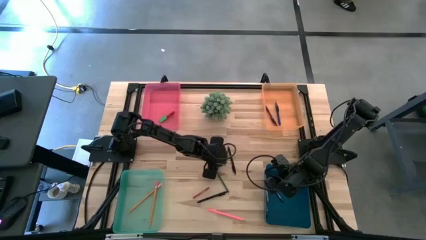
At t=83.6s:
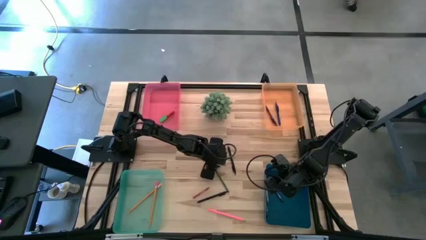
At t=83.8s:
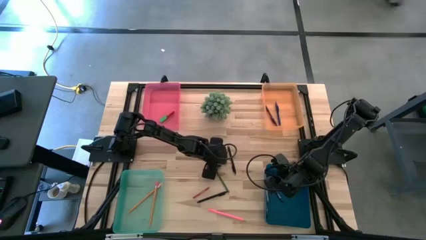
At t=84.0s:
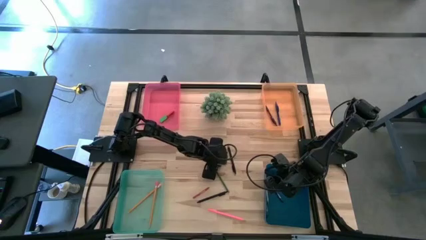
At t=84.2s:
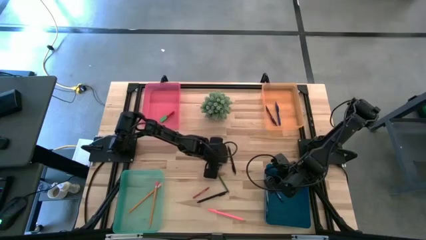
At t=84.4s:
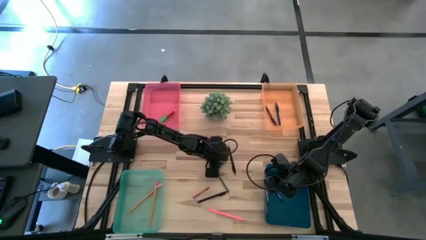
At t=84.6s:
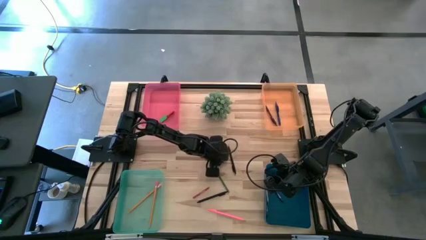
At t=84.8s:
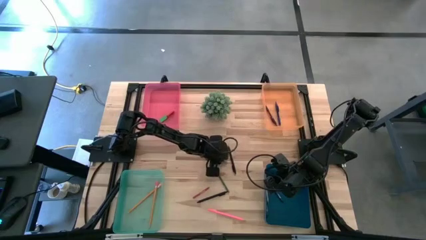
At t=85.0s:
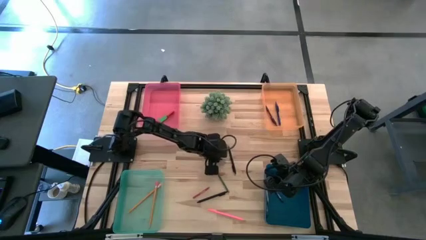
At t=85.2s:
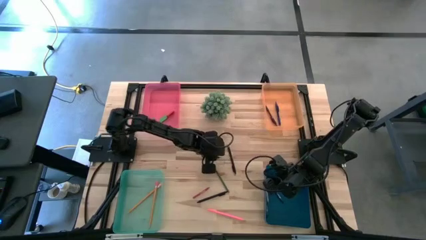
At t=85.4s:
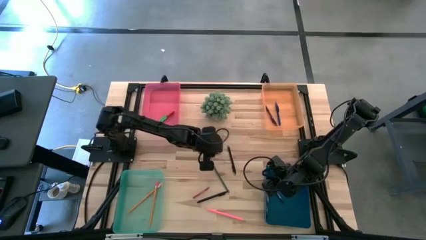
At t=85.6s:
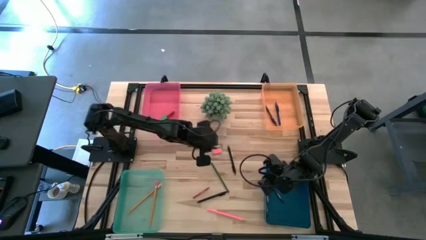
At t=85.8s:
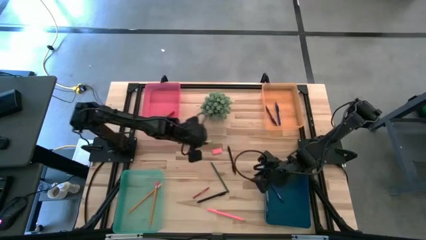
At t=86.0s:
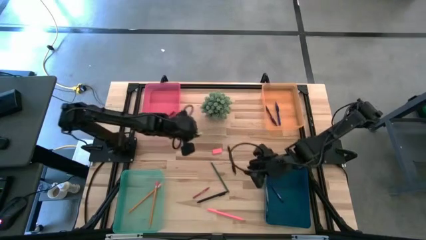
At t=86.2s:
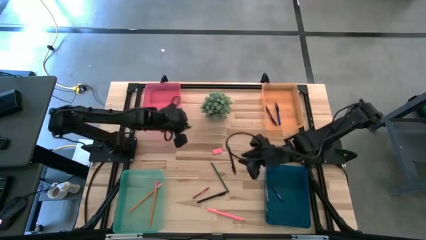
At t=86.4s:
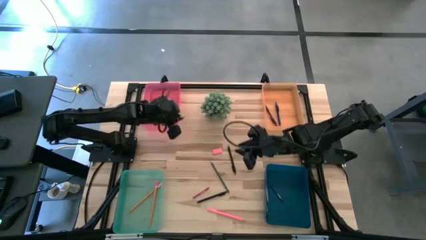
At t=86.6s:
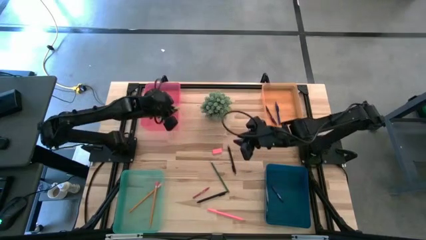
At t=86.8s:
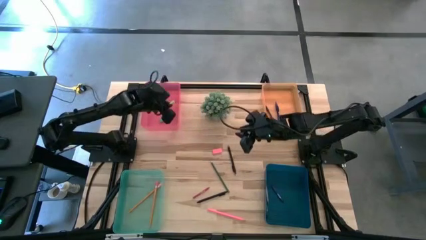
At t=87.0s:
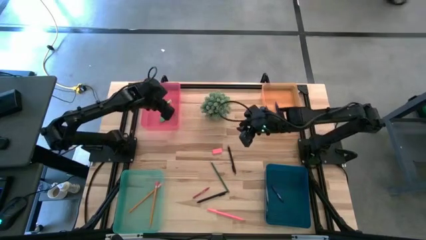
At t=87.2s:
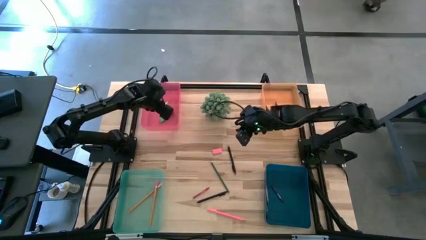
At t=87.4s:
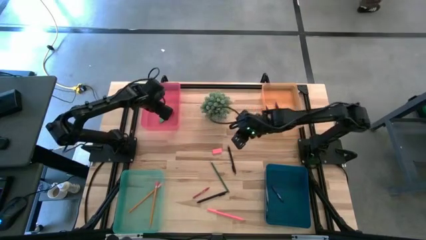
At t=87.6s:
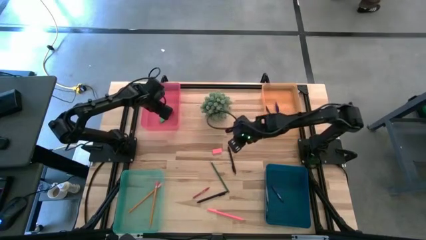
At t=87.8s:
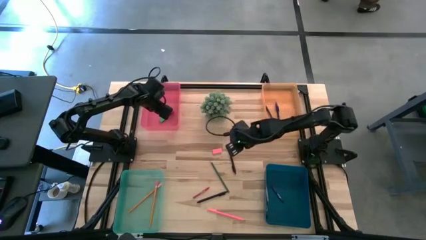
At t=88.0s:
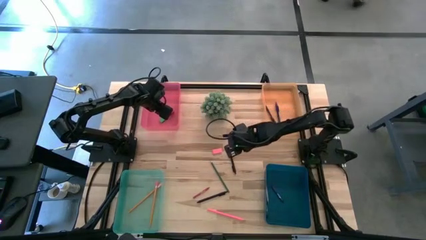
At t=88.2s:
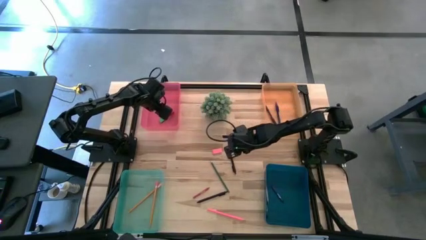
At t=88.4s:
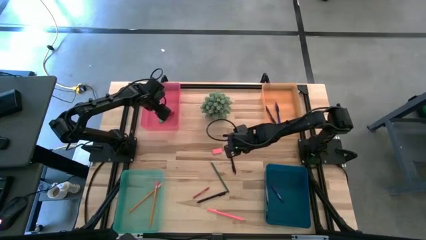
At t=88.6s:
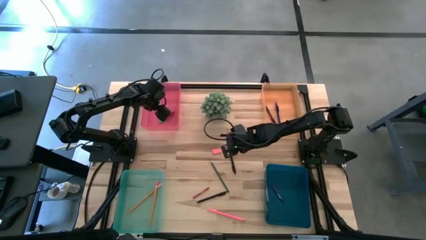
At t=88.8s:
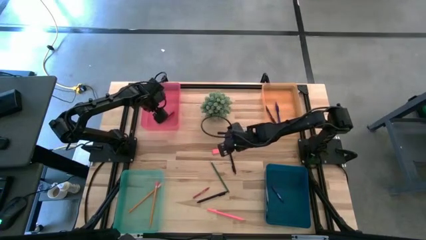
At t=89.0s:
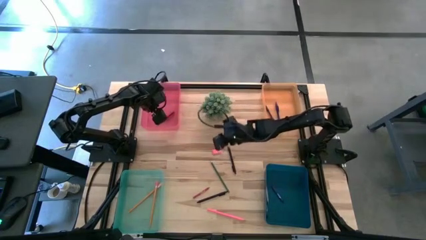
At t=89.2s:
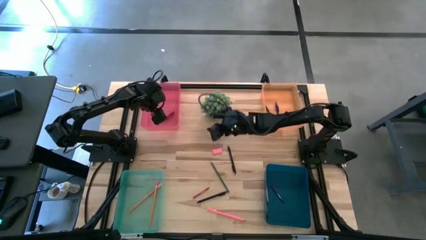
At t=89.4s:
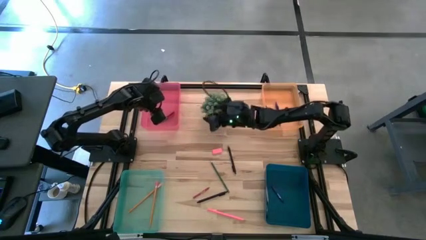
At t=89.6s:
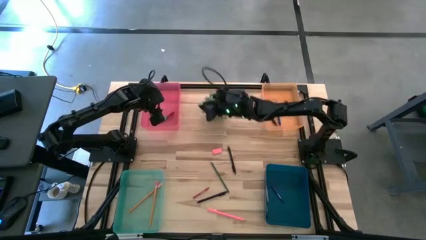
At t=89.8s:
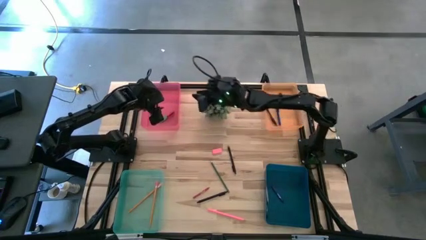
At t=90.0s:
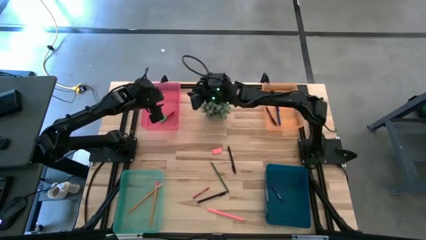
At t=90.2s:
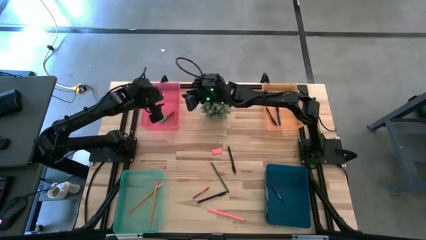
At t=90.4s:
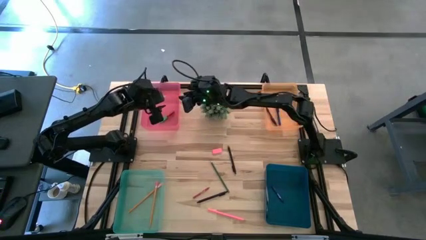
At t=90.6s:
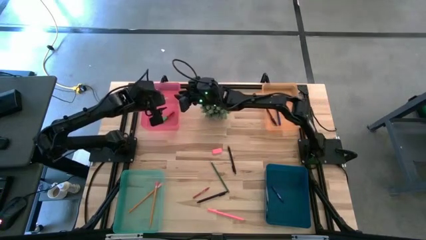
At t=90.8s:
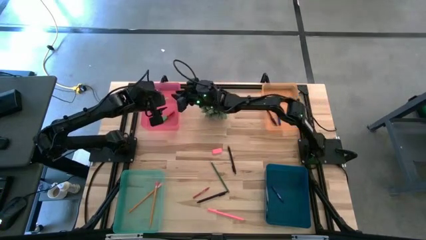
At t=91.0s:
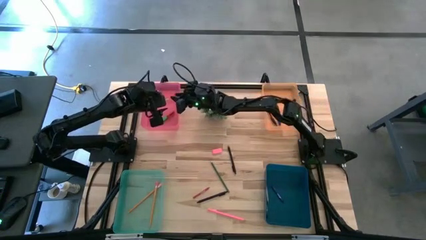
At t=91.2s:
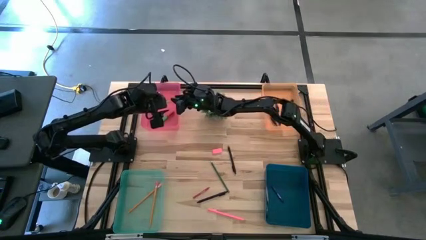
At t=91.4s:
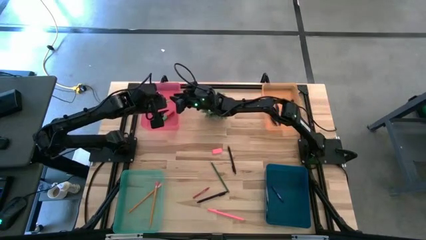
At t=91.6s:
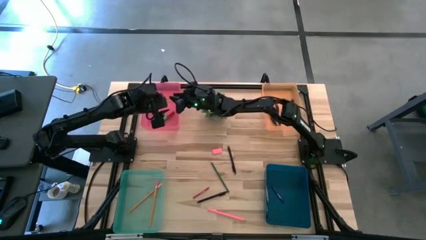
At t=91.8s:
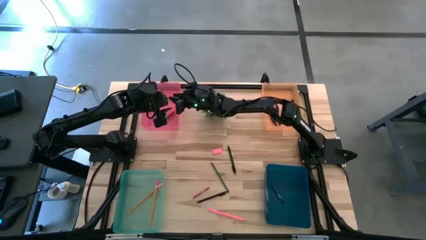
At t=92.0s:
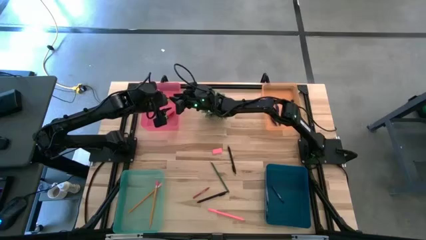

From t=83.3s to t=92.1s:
Task: Sort crayons/erasers/pens/pencils in bins
Put the light green eraser into the red bin

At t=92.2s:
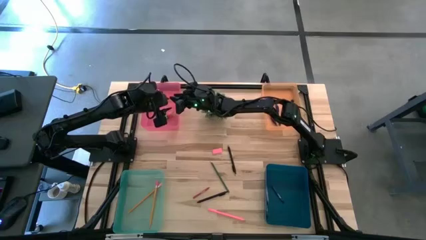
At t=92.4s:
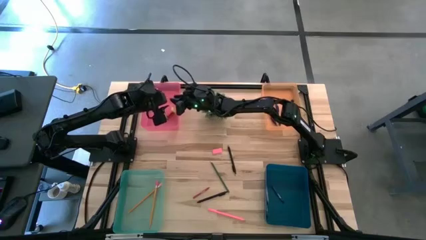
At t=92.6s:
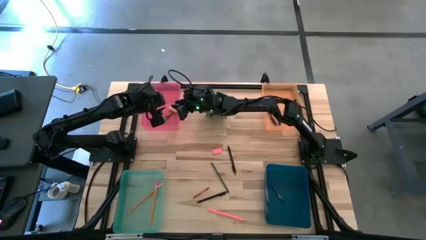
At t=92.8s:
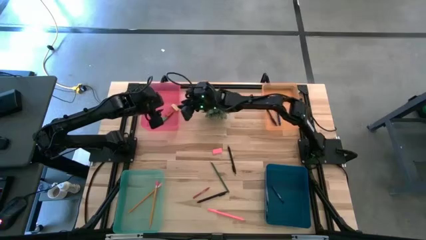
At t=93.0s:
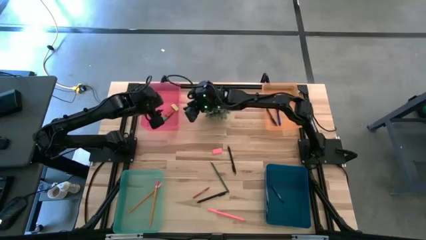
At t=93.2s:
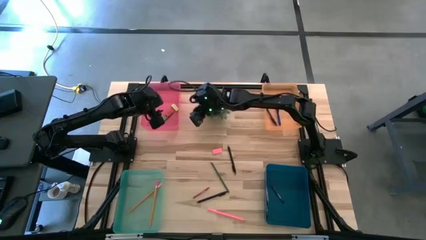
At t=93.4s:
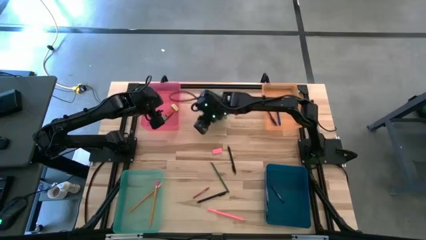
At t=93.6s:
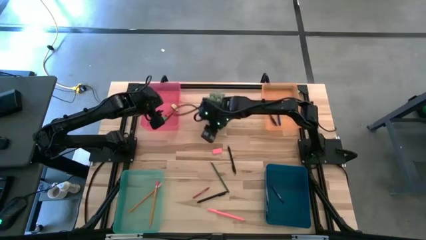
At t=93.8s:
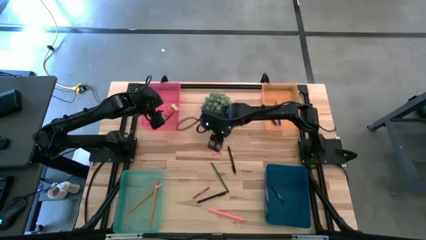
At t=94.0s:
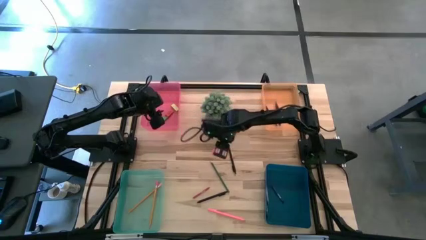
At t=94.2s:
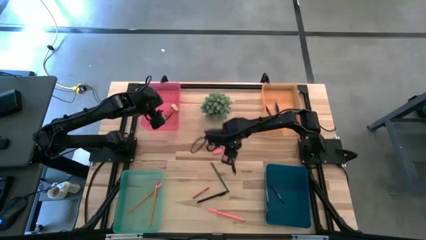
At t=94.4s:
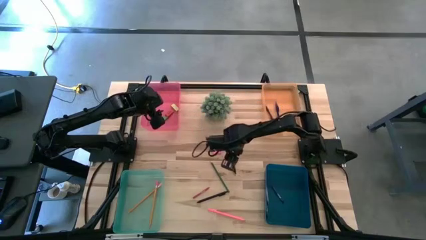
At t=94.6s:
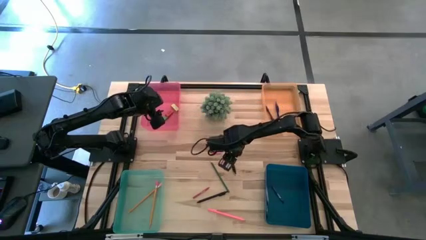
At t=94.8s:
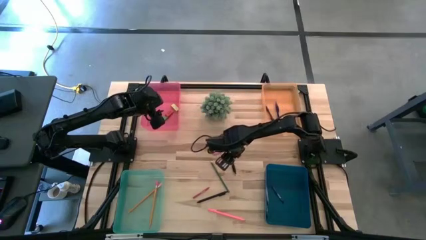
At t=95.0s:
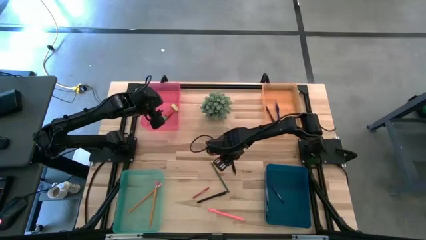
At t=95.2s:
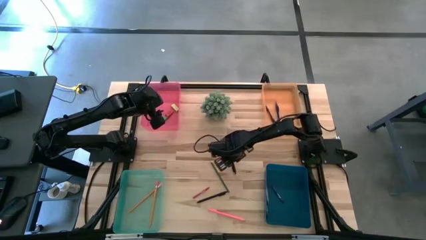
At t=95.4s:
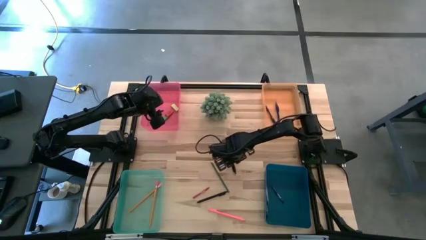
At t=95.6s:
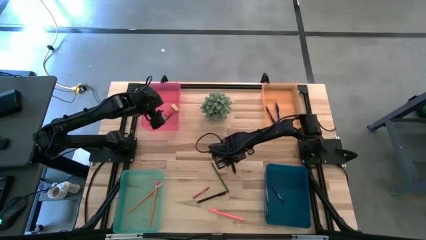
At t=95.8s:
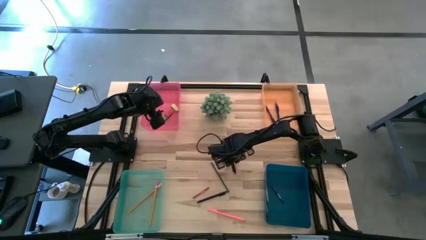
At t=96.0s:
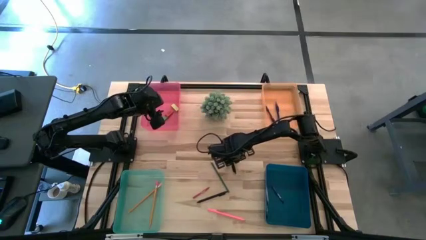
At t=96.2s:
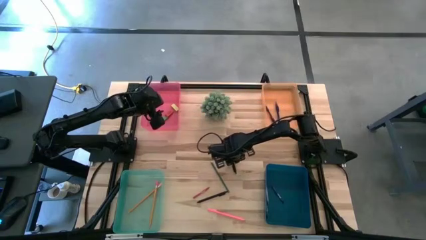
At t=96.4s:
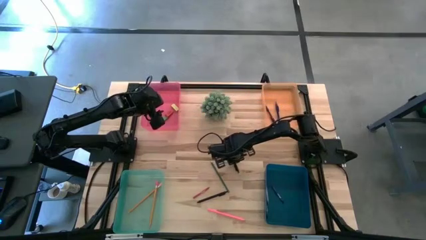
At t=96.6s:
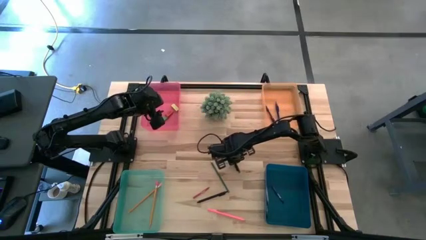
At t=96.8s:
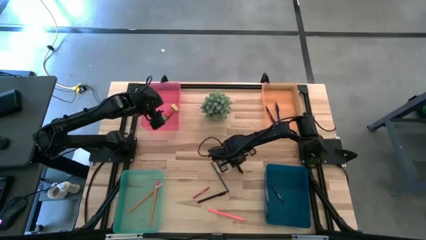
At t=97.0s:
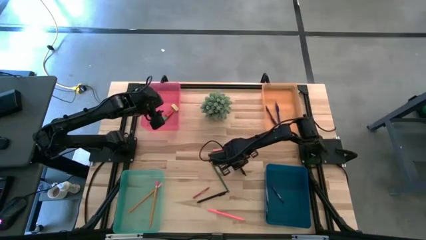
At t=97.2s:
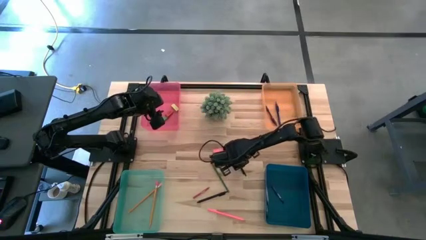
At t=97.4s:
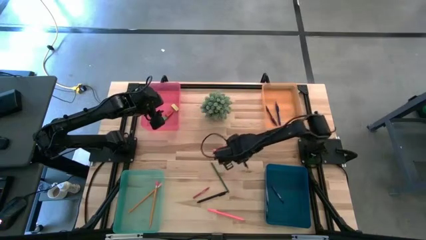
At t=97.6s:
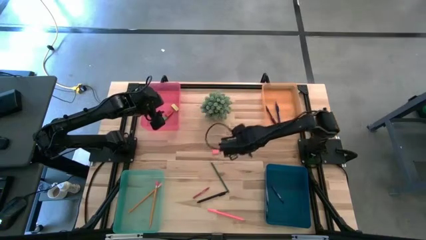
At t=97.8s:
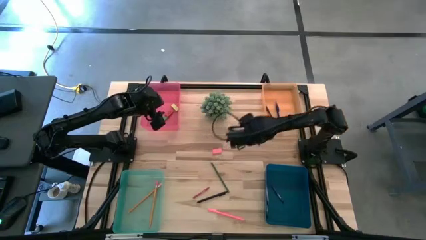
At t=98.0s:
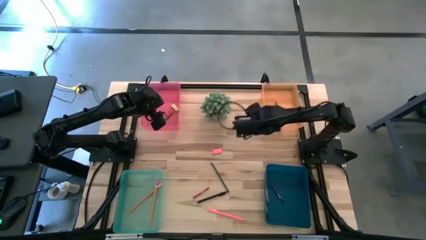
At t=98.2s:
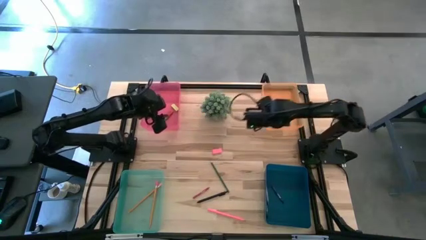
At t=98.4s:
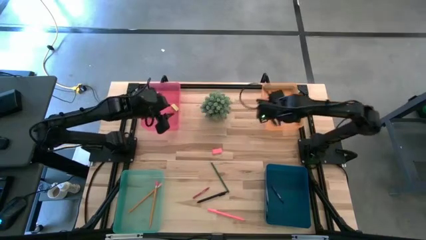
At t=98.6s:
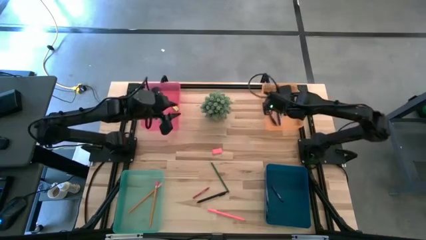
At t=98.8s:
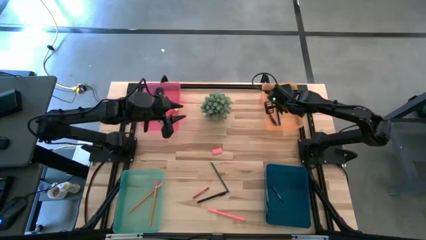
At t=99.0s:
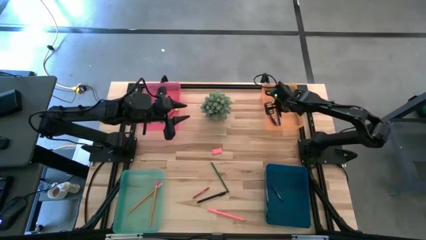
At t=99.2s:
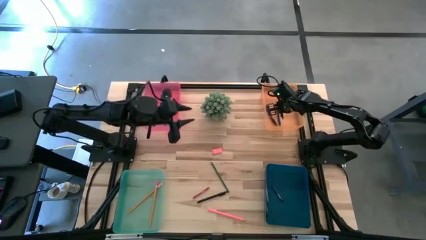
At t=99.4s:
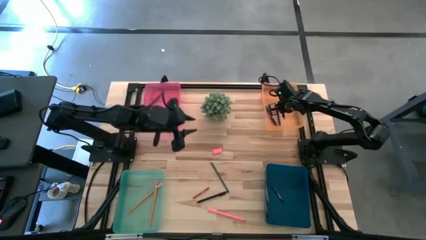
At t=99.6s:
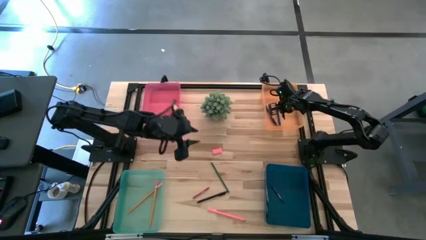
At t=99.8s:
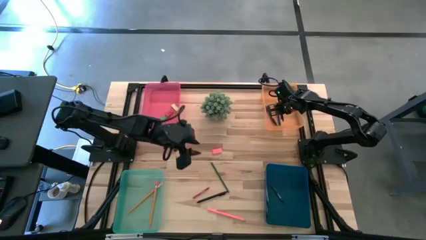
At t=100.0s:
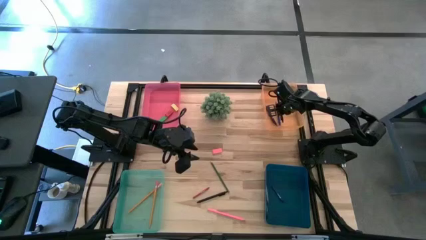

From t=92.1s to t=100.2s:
Put the top black pen into the orange bin
